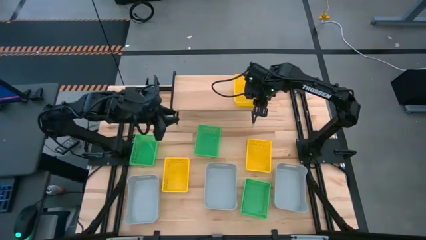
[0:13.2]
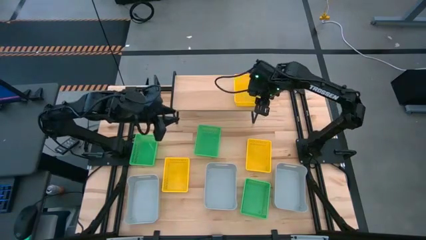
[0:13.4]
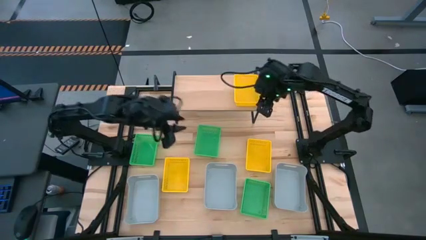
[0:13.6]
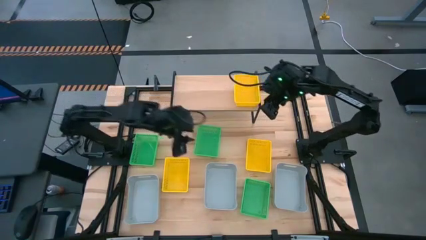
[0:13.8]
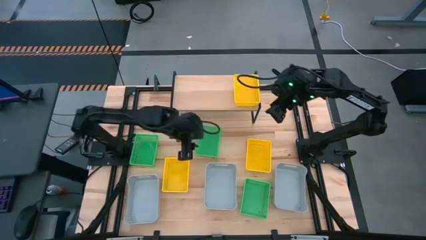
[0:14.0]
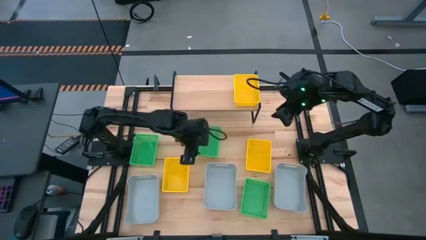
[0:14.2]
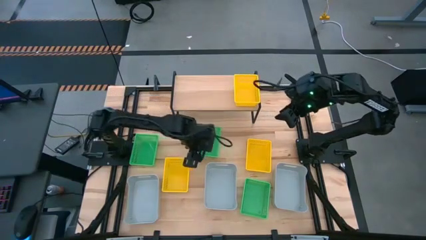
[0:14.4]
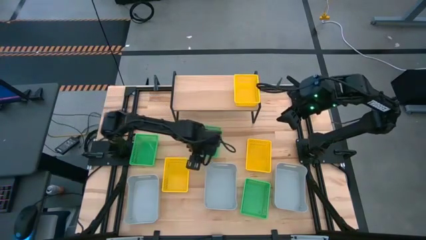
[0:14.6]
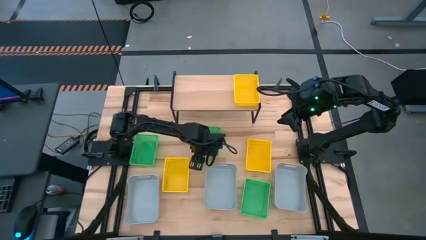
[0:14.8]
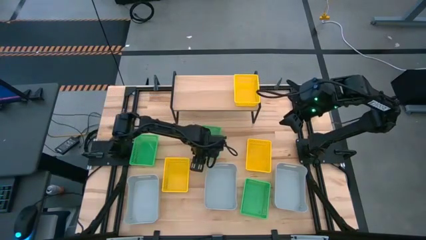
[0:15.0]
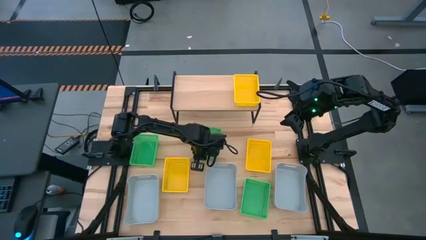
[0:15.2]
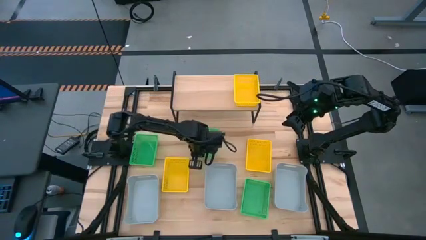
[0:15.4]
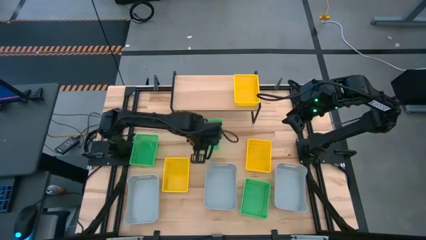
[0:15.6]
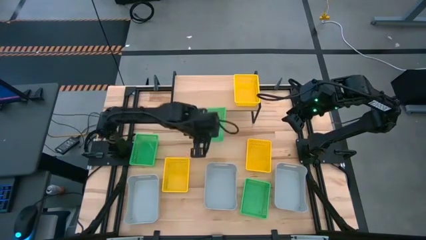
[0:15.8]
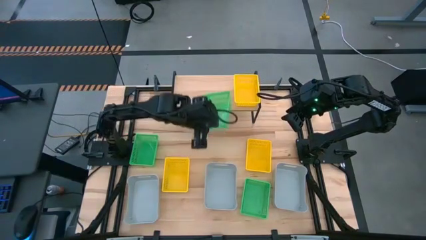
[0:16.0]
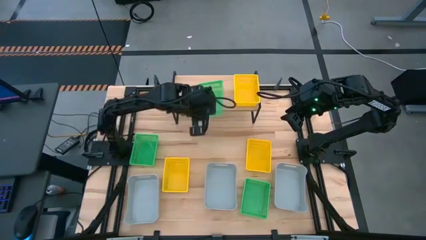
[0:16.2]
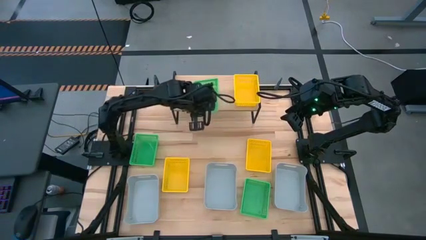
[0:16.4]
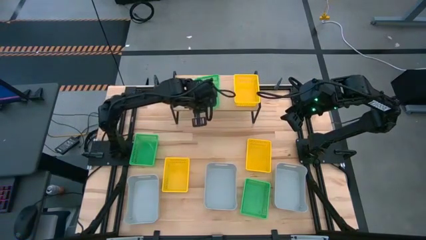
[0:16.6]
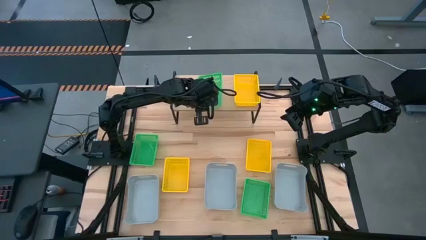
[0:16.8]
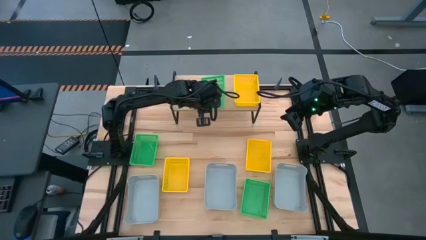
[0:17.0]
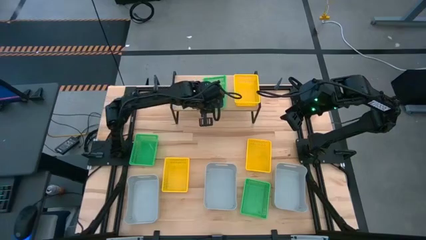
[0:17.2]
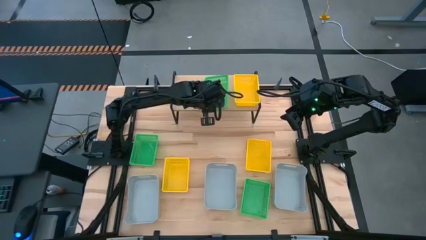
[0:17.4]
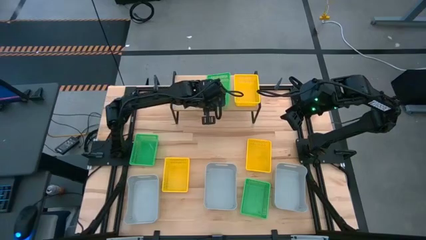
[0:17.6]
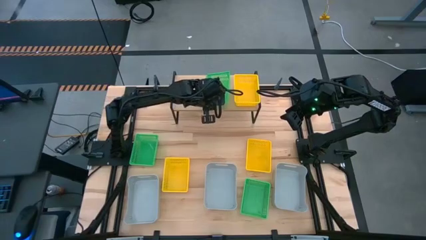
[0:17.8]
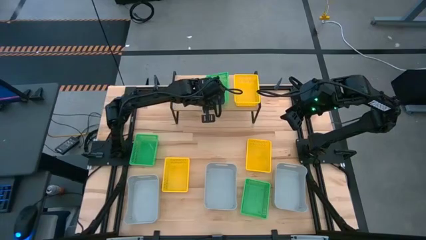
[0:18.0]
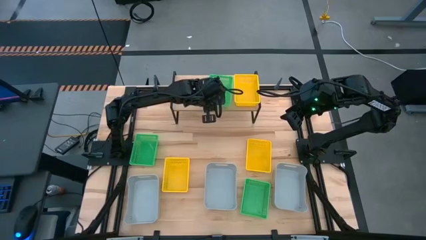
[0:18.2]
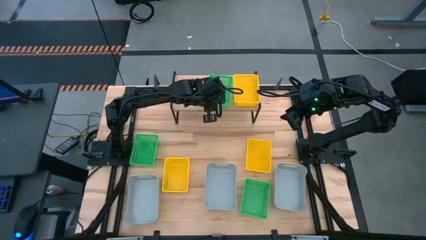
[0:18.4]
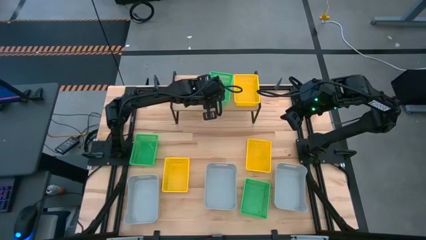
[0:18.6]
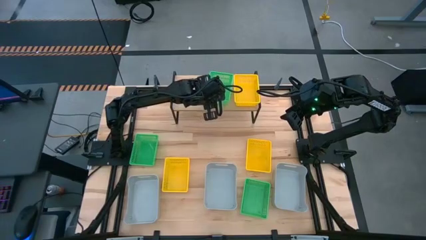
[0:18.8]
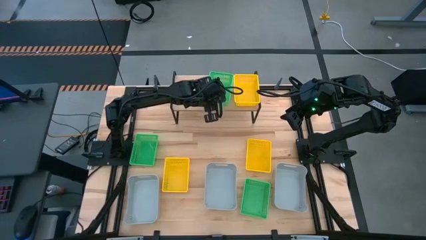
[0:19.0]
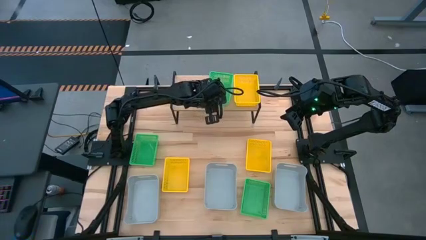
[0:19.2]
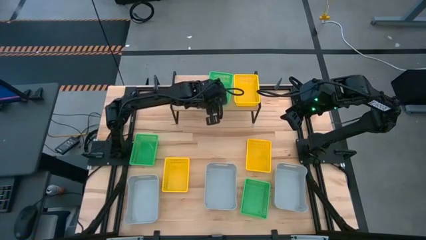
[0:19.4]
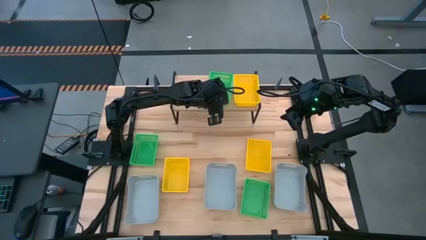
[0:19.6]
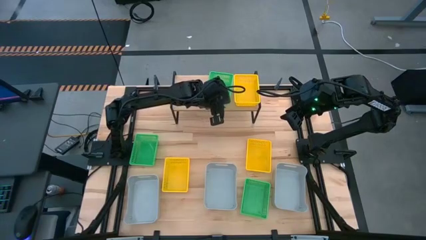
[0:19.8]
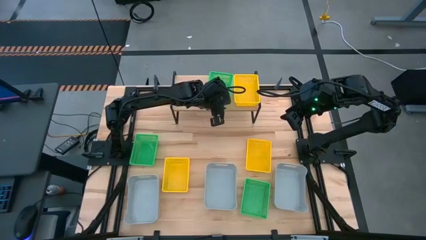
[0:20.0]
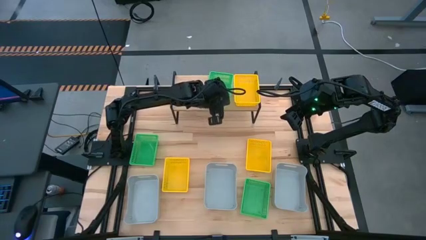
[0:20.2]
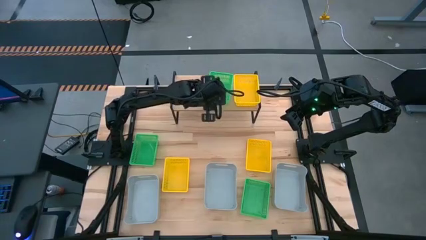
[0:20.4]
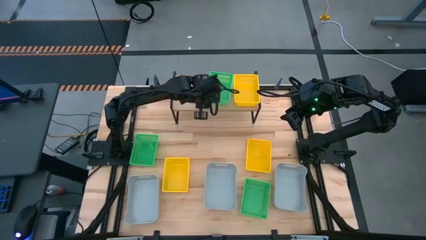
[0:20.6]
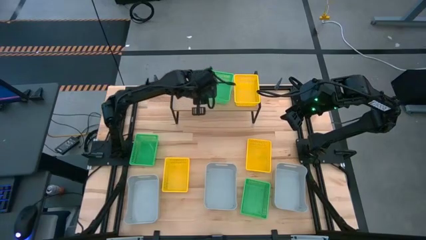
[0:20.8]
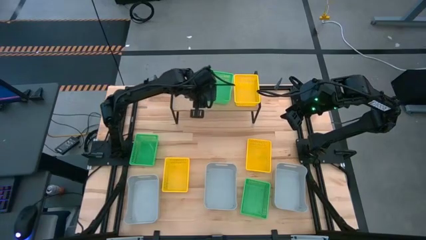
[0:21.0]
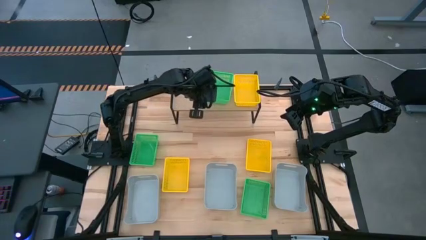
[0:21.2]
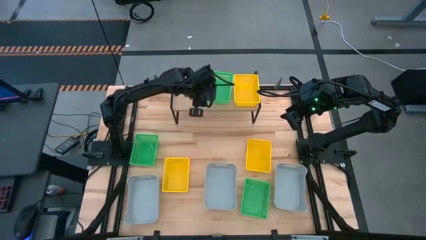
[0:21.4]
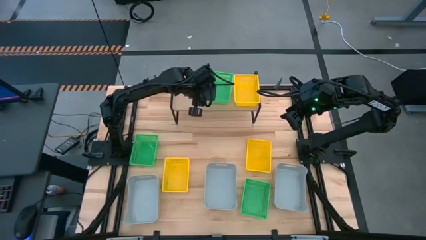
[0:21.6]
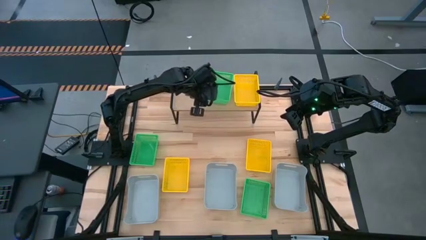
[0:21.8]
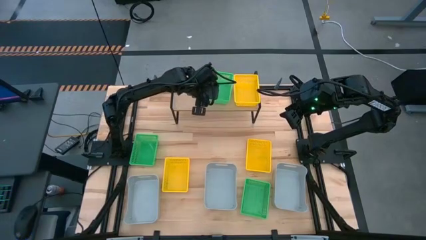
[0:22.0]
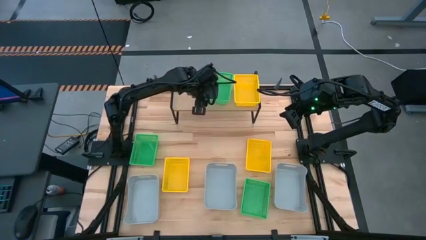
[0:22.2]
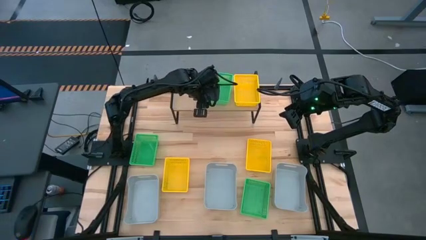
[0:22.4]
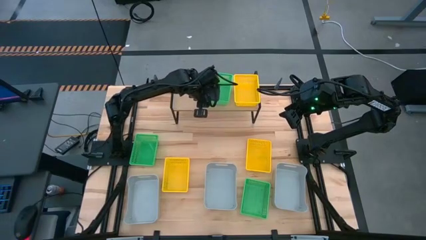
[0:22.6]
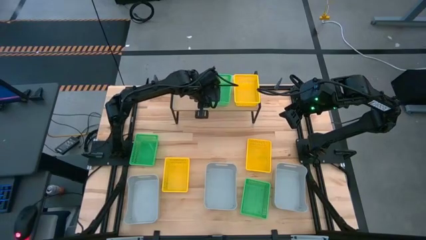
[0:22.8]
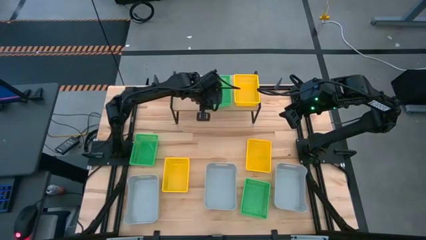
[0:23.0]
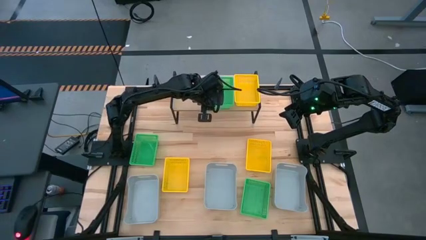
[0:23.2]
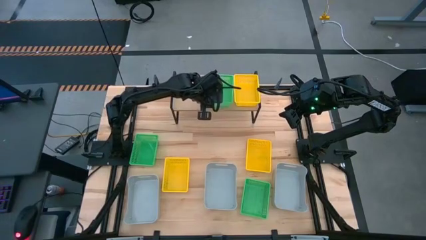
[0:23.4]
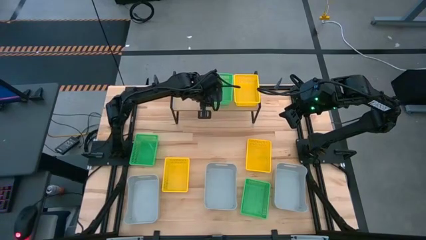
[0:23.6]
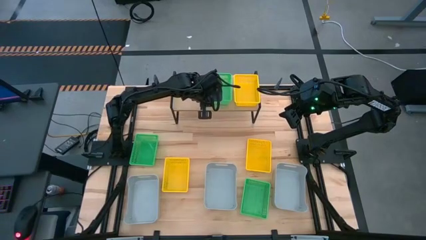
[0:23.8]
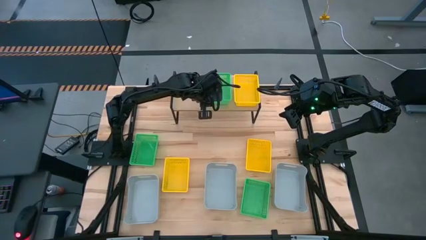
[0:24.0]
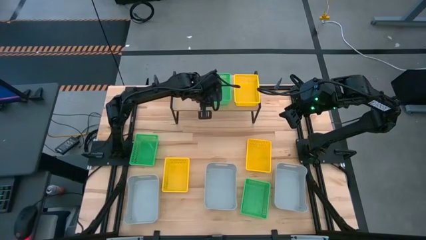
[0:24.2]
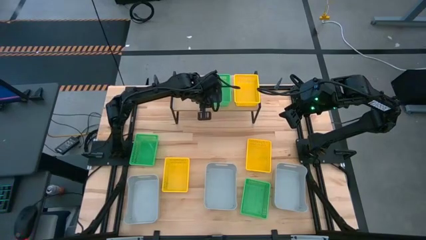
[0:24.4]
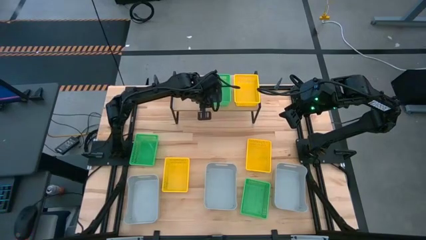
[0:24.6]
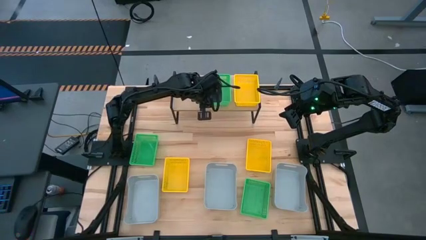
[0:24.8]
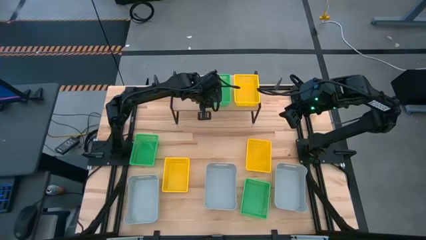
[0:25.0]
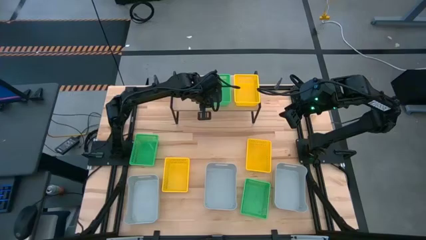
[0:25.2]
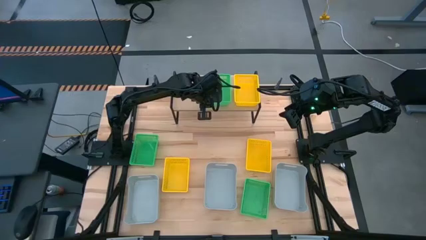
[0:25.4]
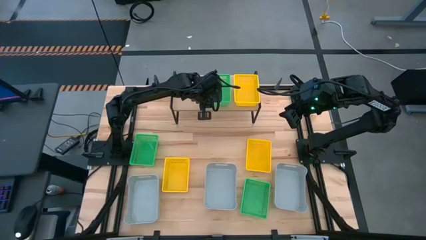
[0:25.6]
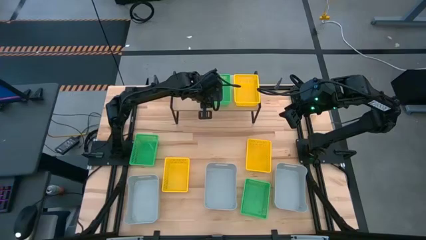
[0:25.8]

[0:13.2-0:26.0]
Task: Stack baskets on shelf by color
Put the middle green bin on the shelf
